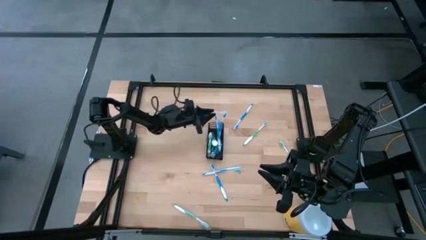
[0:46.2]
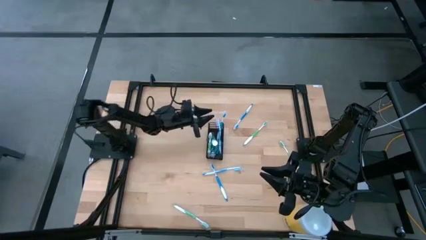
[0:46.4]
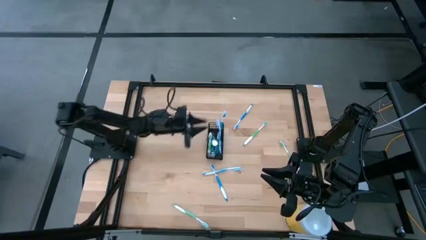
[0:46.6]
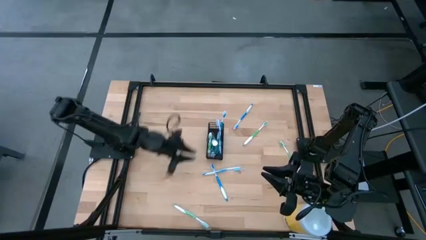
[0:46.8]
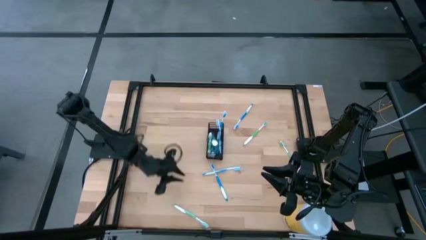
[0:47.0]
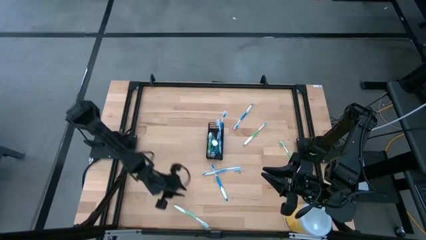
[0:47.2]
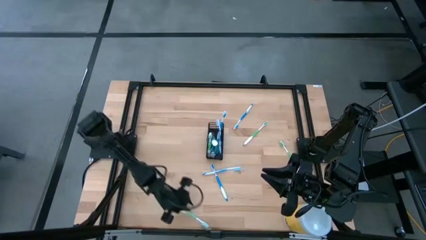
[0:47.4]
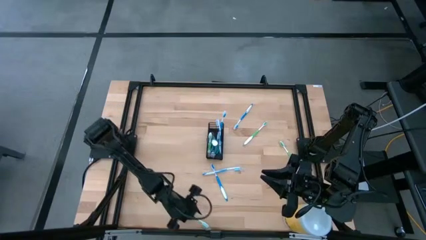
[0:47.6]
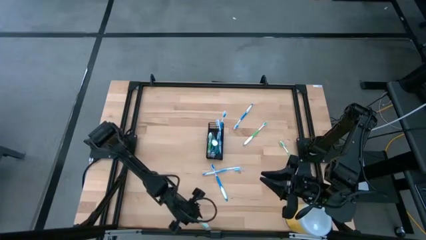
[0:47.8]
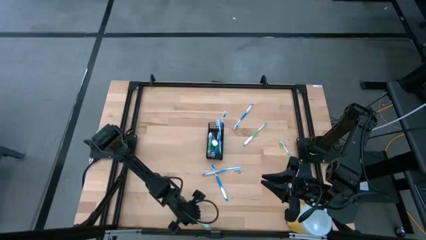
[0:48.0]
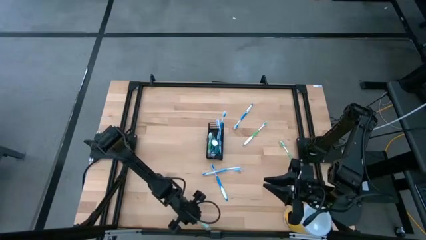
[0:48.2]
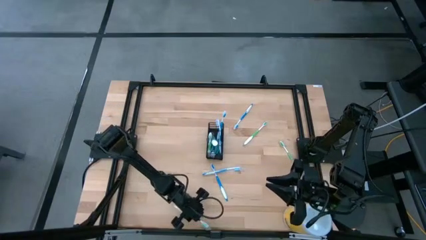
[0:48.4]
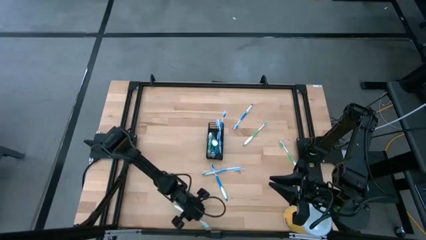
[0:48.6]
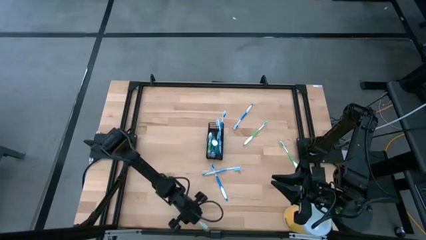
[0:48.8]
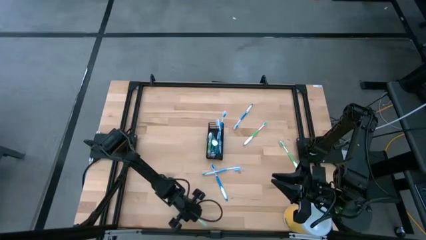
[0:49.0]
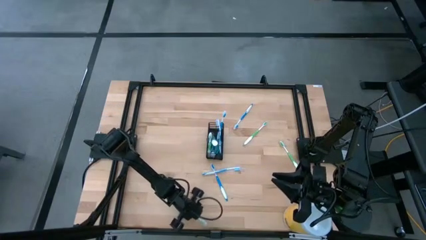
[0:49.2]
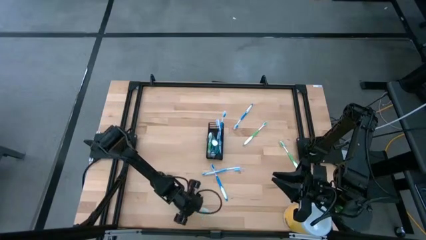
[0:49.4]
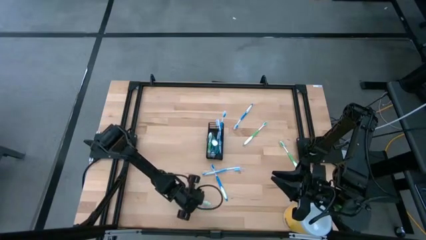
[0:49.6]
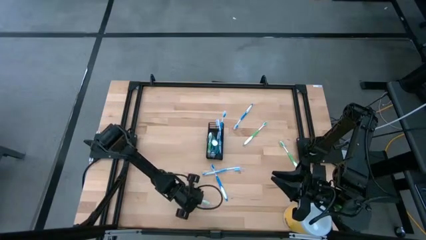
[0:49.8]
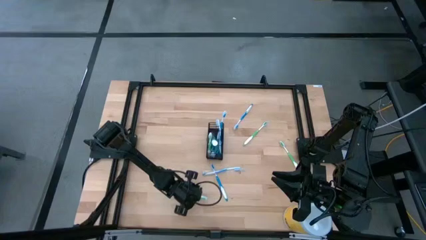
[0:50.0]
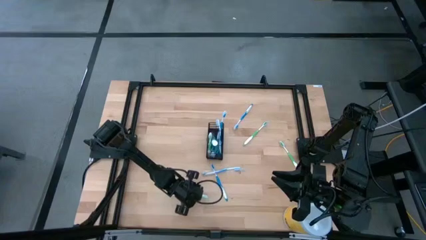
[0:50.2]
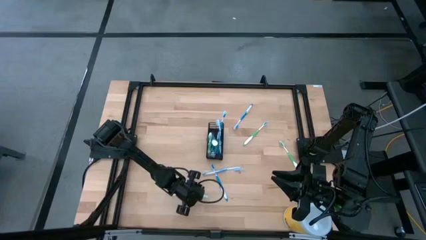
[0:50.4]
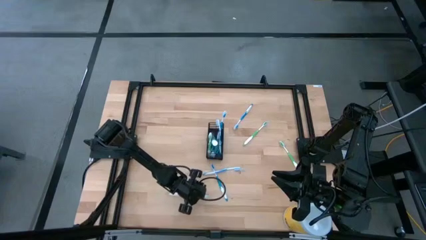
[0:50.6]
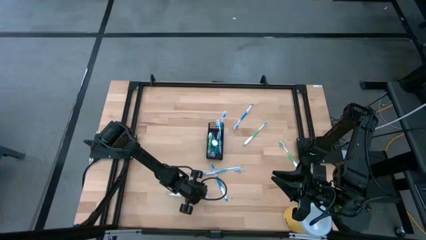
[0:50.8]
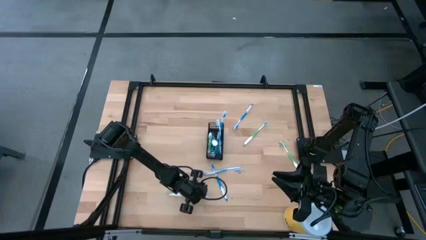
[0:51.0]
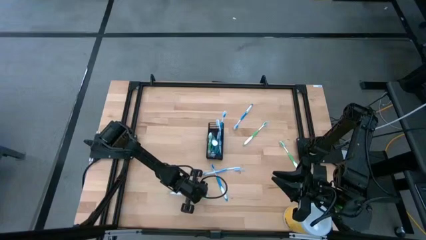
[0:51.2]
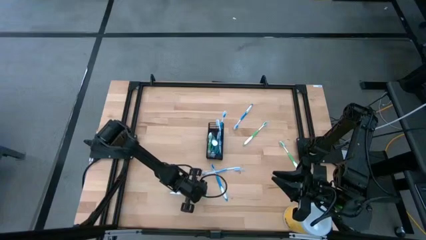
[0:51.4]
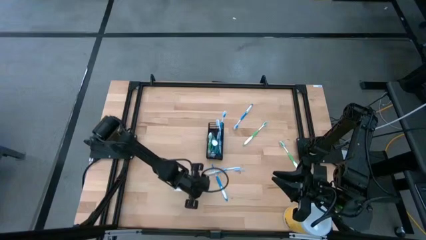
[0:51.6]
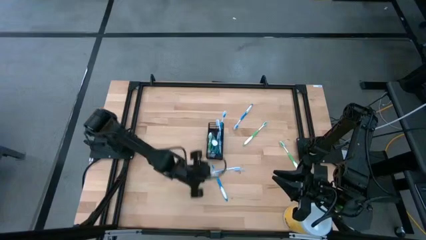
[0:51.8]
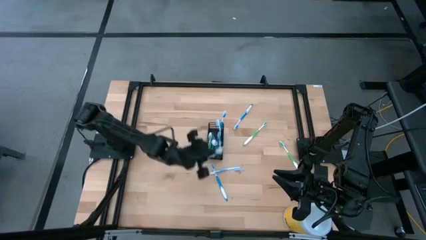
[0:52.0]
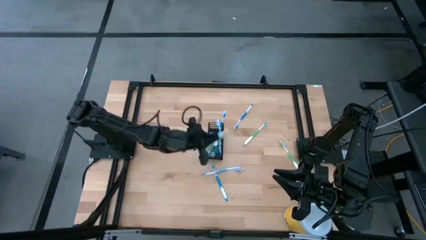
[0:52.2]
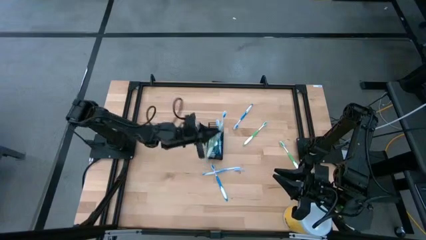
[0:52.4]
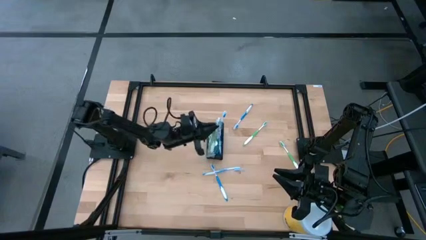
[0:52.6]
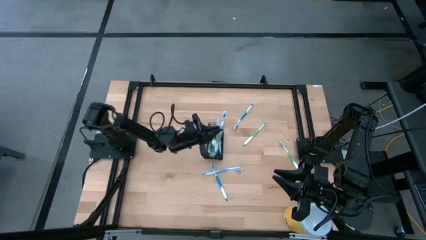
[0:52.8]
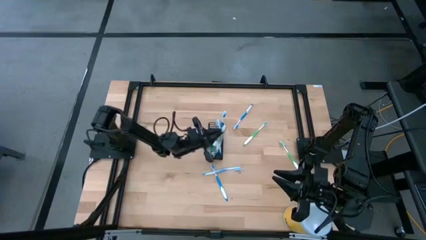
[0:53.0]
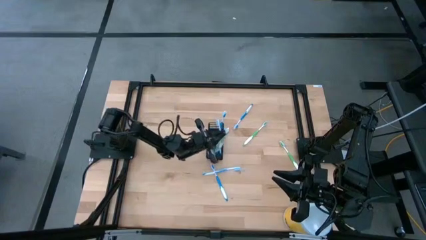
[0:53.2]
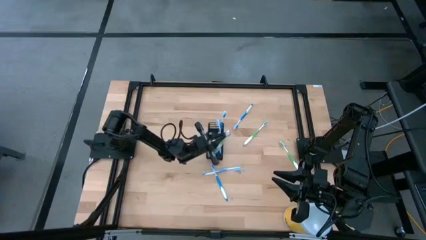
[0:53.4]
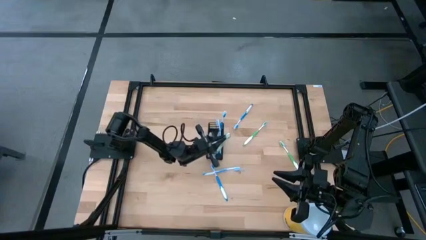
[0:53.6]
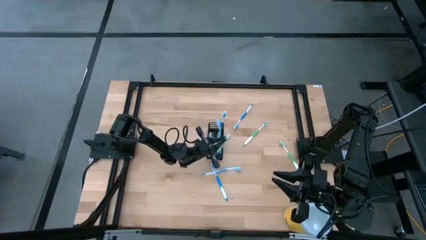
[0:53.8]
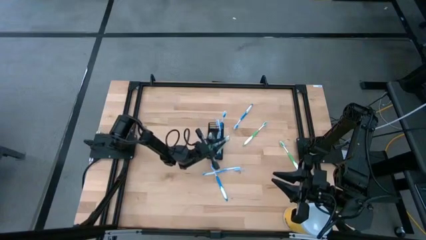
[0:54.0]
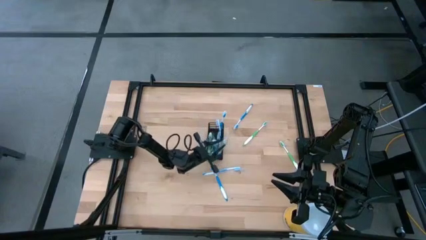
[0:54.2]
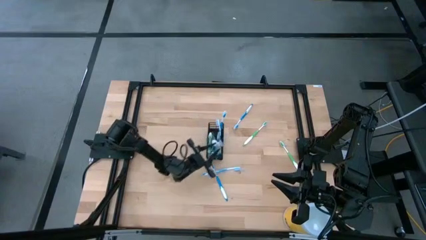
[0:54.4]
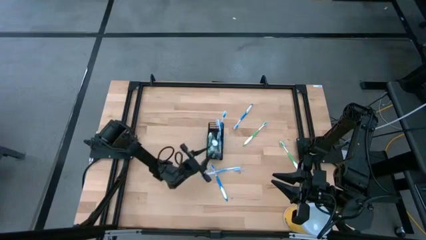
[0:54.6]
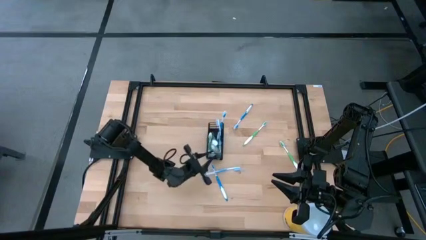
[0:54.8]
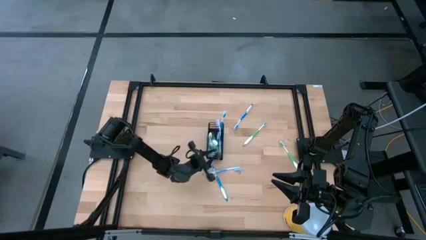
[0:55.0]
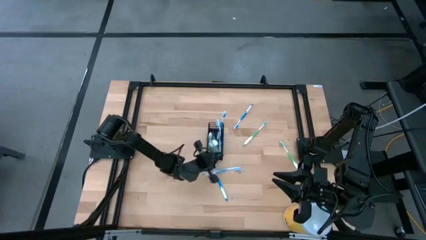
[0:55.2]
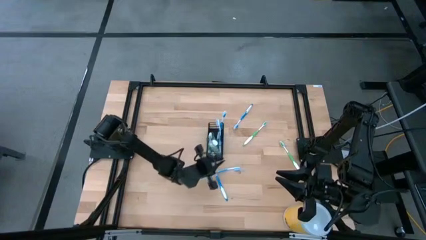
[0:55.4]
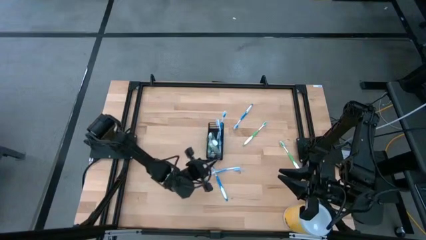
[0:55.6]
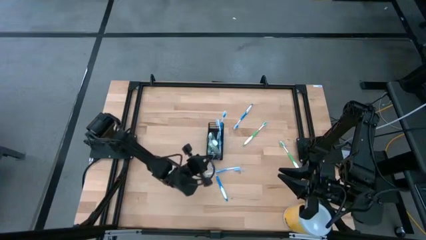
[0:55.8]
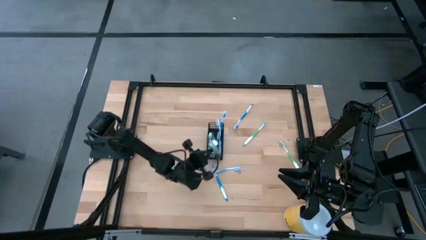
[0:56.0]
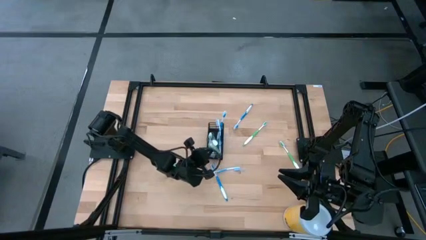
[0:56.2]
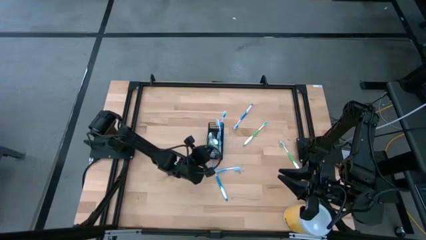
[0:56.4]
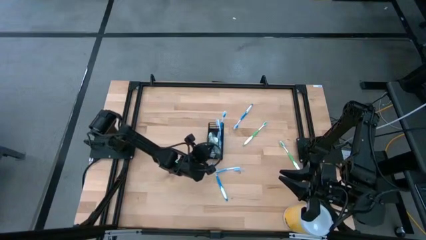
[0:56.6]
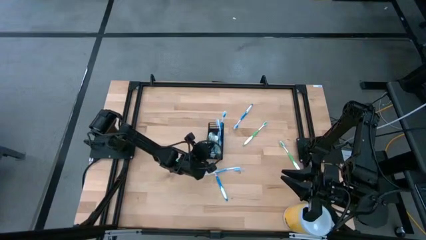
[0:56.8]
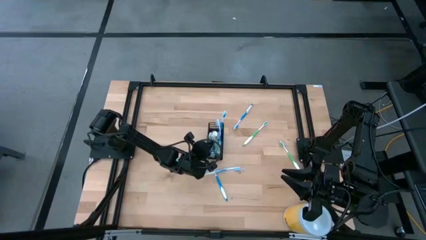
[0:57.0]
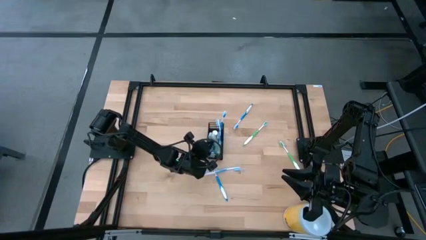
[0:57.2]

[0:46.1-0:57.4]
Task: Pick & Place toothbrushing station
Put the green toothbrush into the black organizer

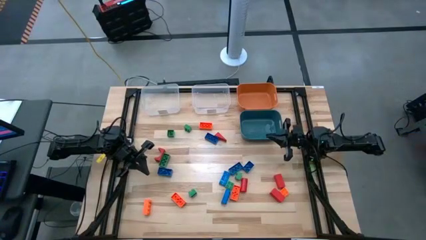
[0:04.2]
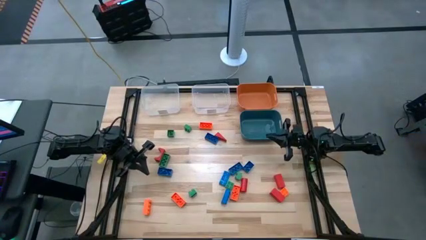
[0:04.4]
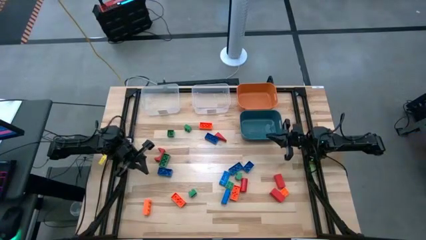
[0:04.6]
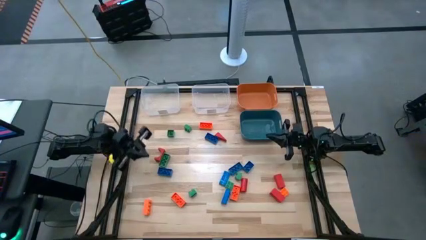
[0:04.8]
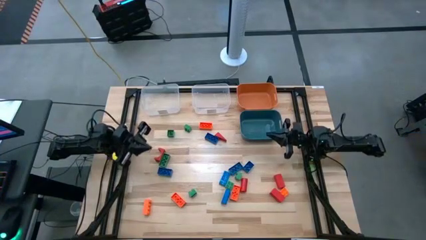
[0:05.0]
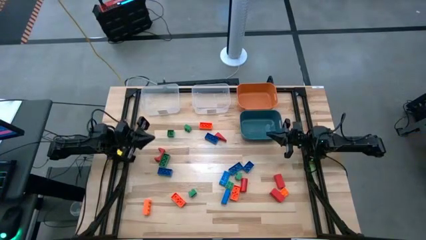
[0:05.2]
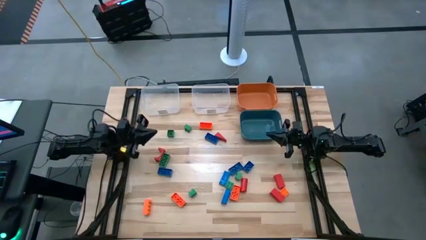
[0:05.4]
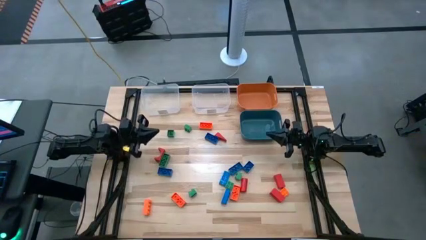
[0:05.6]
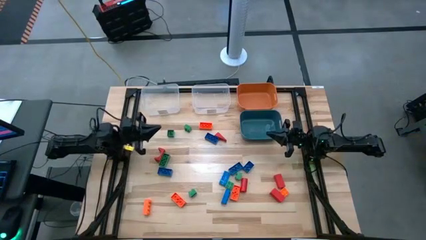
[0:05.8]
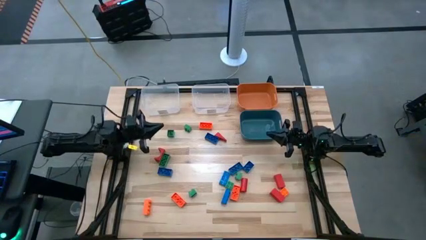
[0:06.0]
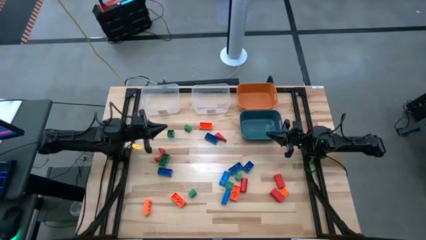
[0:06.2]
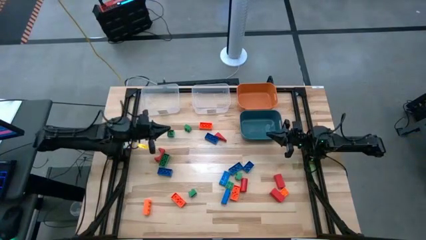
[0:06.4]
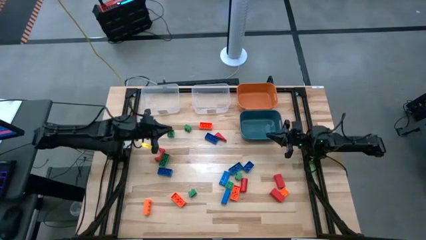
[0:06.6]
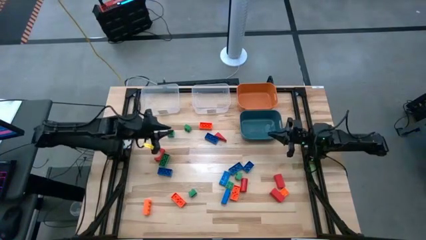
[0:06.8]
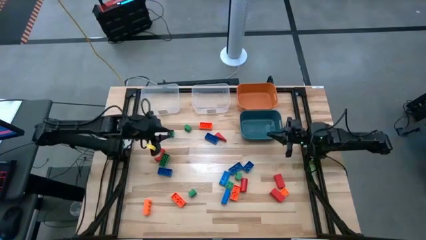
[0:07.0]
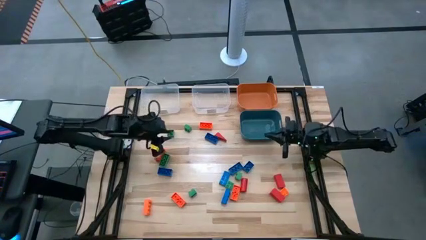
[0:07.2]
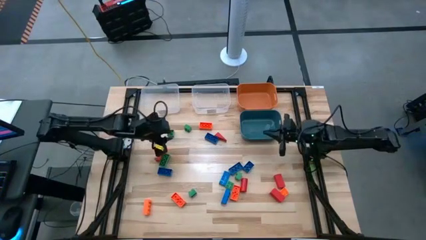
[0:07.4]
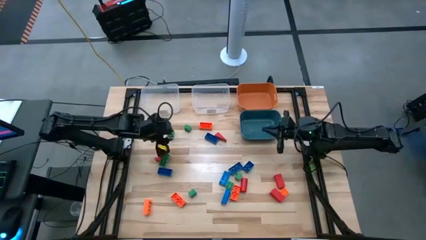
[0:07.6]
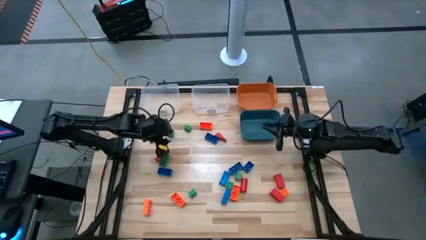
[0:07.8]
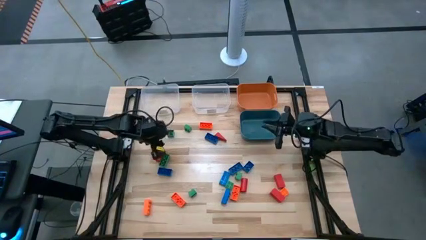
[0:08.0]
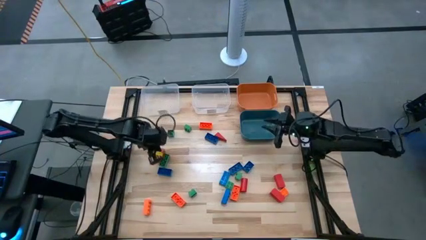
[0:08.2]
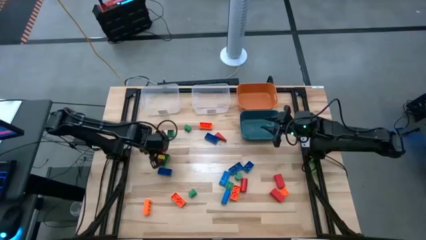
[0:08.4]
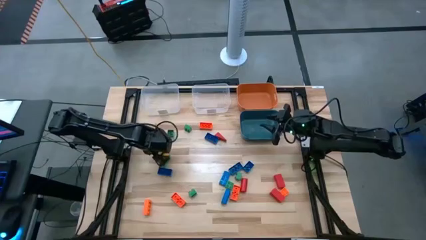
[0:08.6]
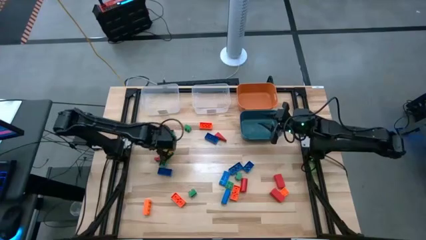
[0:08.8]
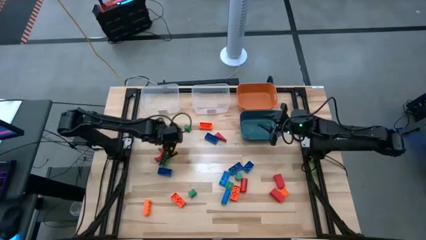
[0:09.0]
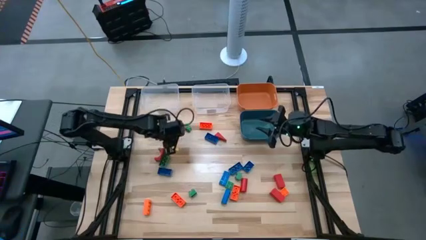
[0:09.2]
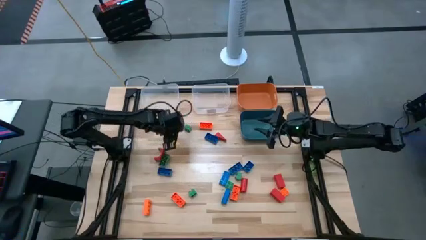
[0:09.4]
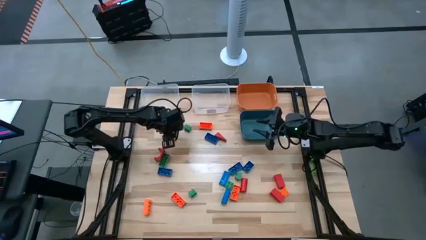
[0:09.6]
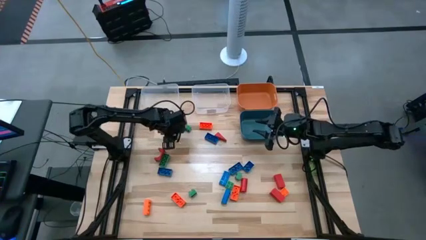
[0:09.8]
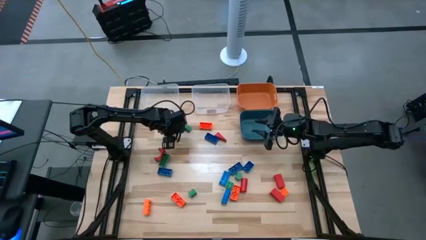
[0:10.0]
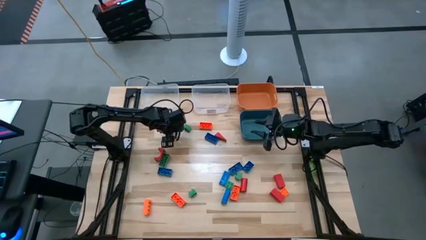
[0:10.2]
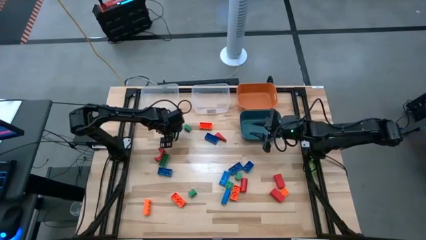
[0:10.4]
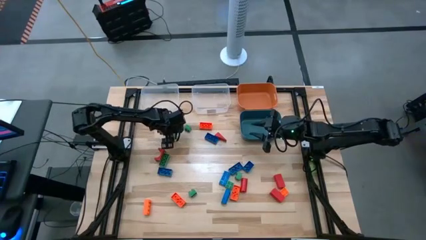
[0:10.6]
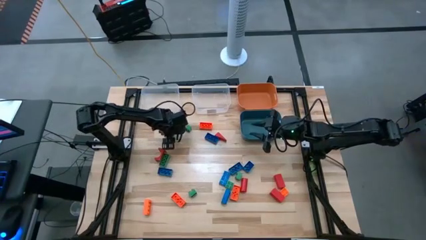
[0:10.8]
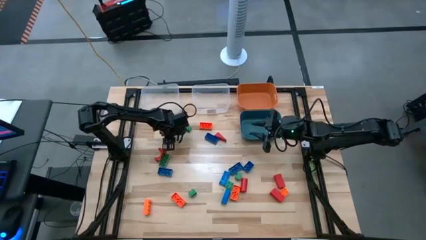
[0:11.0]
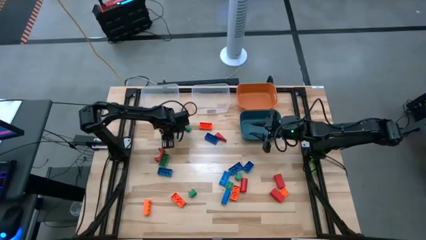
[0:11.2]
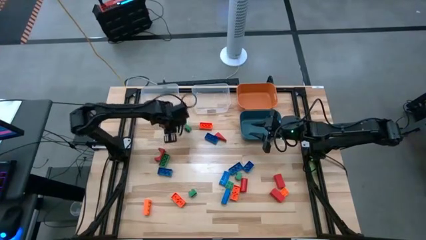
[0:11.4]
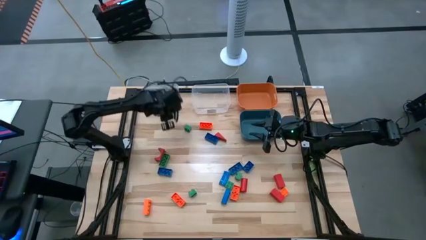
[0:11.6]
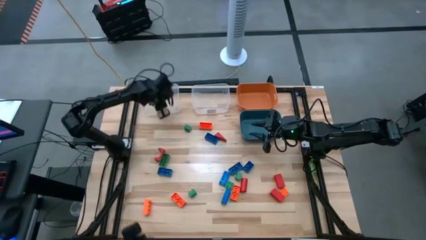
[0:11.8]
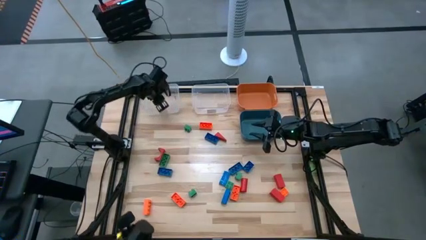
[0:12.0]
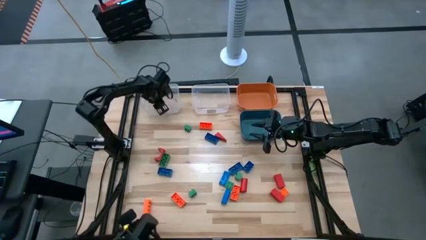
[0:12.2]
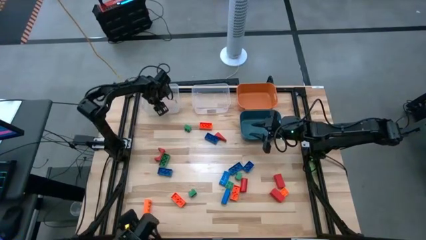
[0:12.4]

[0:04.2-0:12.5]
Task: Sort blocks
Put the green game piece into the left transparent bin
